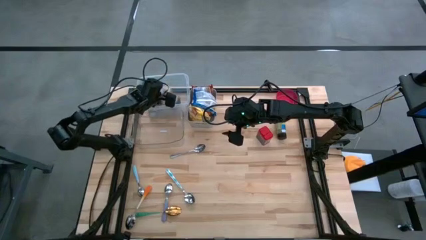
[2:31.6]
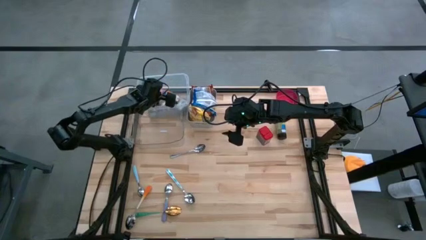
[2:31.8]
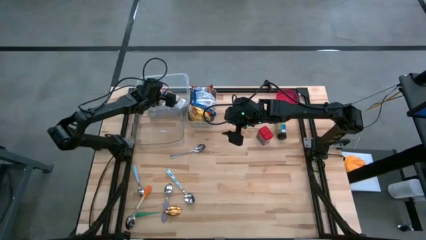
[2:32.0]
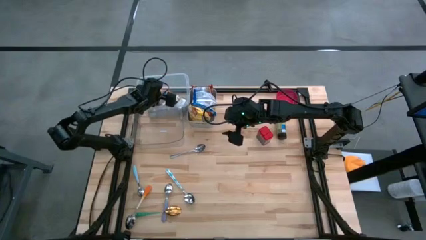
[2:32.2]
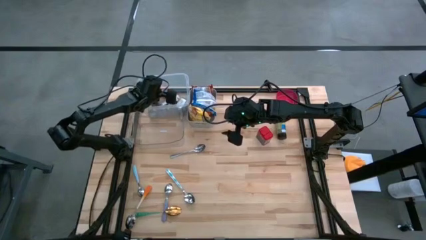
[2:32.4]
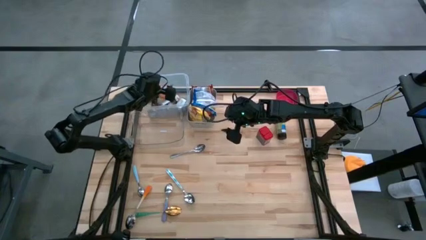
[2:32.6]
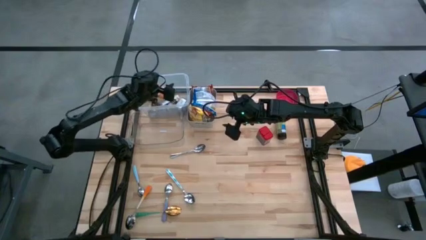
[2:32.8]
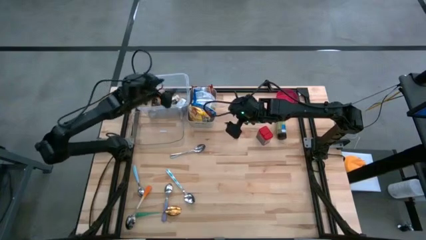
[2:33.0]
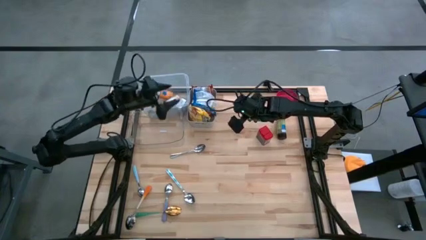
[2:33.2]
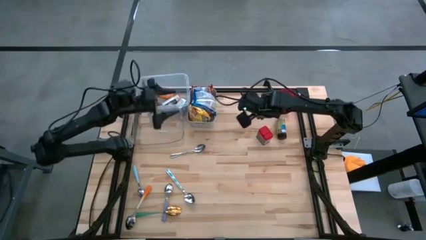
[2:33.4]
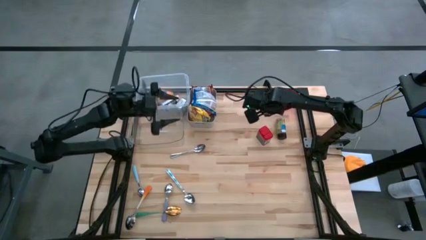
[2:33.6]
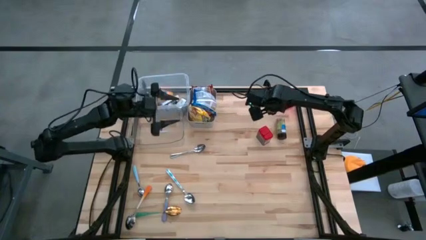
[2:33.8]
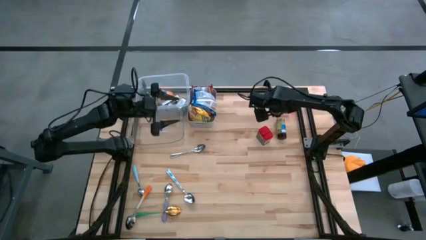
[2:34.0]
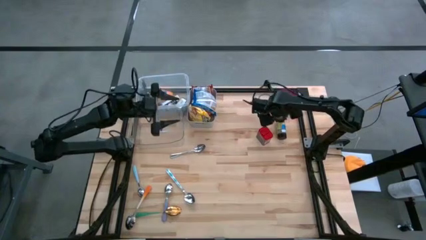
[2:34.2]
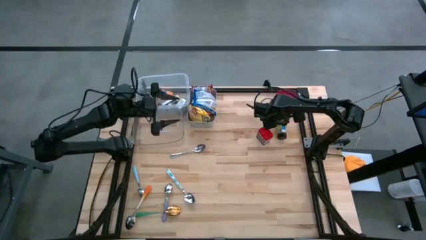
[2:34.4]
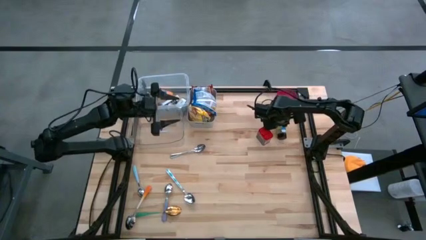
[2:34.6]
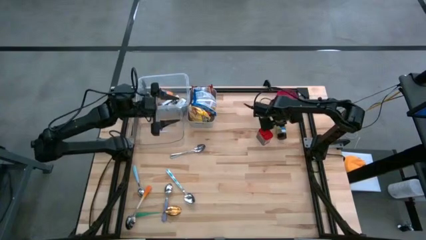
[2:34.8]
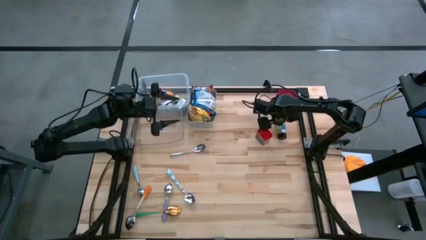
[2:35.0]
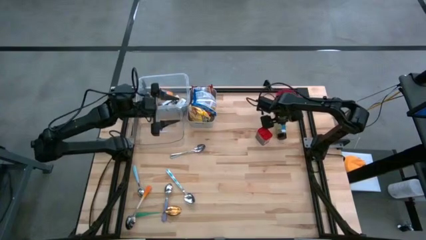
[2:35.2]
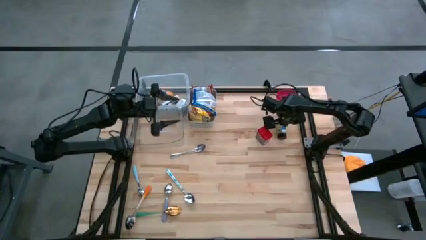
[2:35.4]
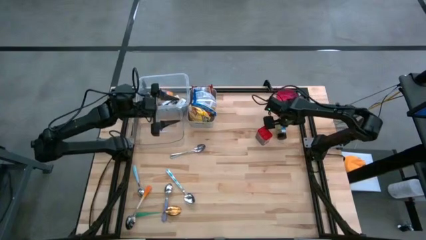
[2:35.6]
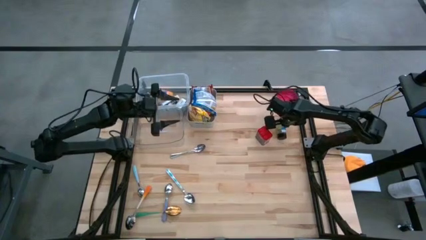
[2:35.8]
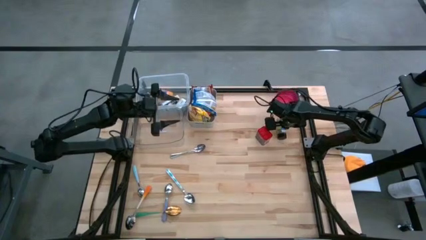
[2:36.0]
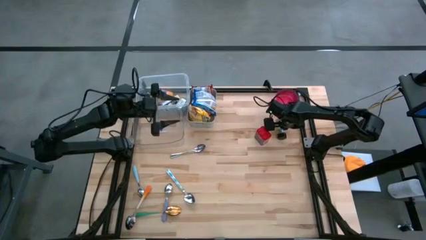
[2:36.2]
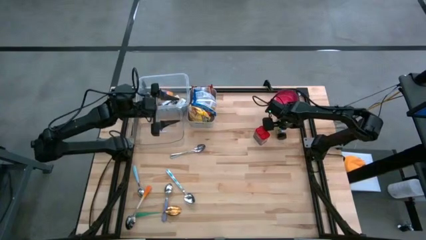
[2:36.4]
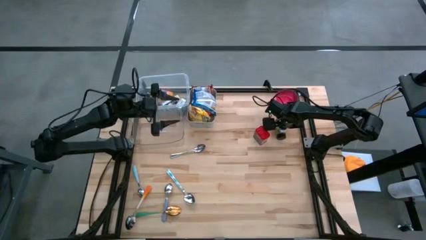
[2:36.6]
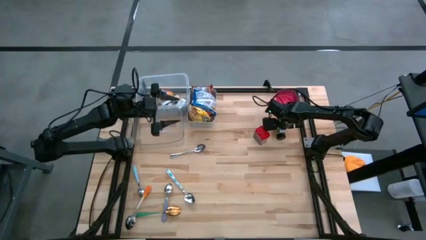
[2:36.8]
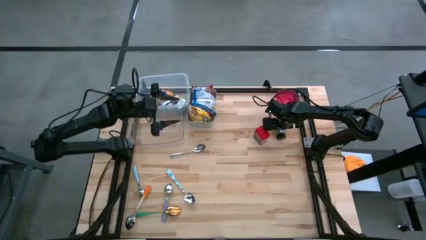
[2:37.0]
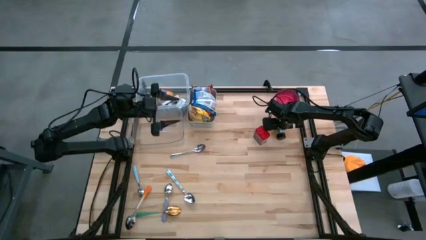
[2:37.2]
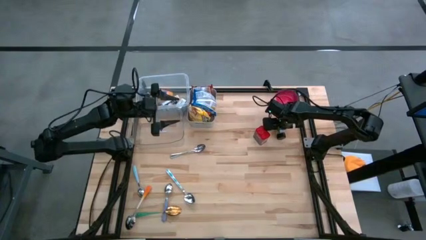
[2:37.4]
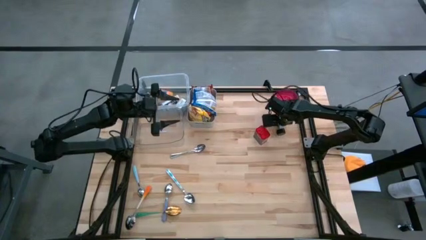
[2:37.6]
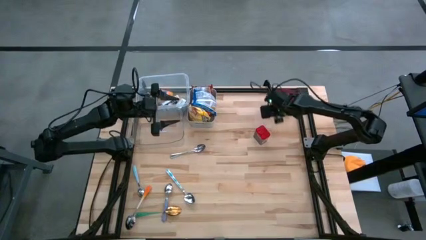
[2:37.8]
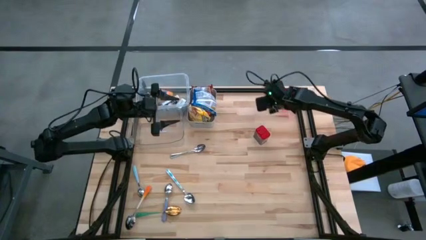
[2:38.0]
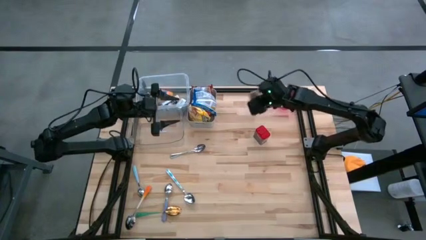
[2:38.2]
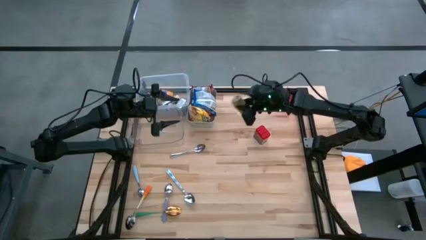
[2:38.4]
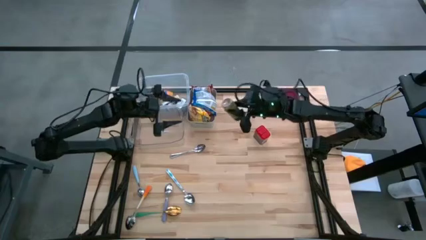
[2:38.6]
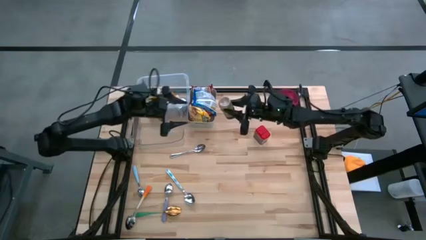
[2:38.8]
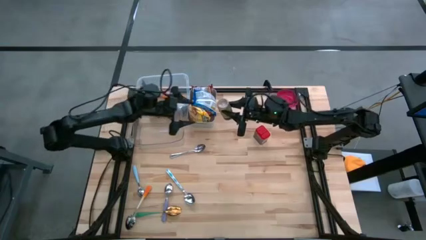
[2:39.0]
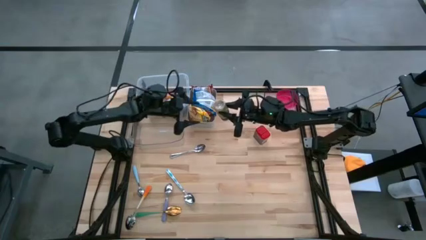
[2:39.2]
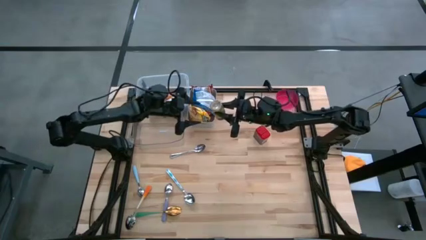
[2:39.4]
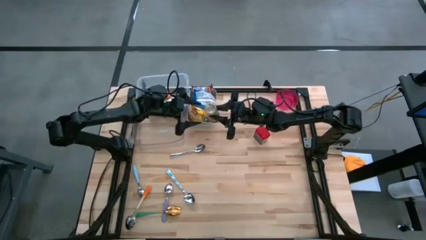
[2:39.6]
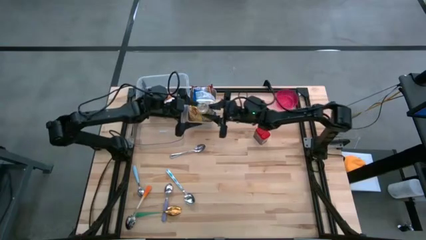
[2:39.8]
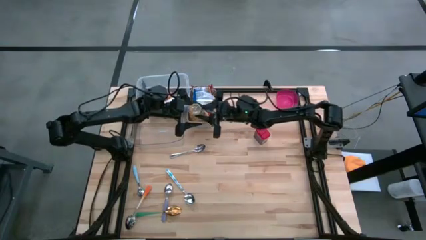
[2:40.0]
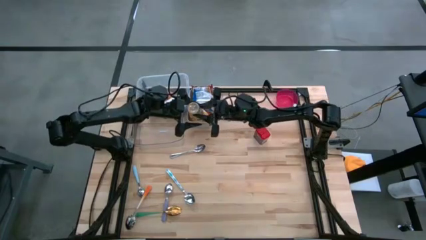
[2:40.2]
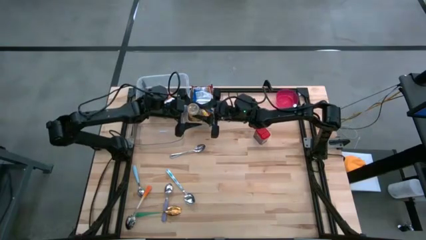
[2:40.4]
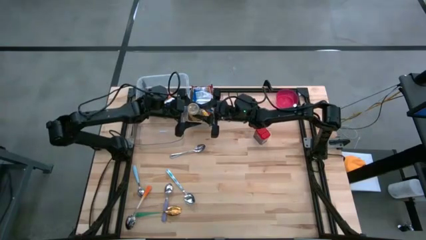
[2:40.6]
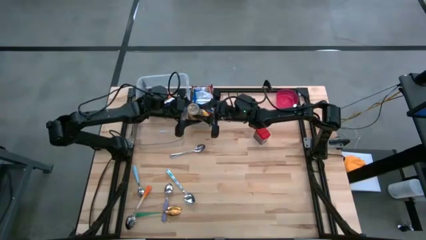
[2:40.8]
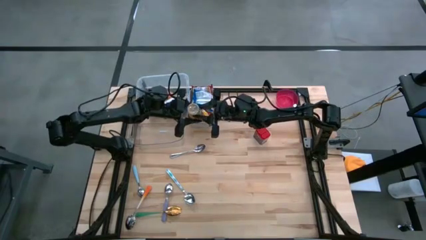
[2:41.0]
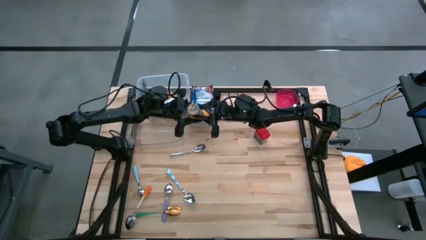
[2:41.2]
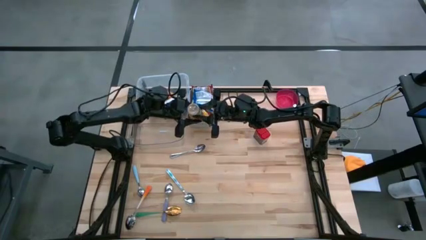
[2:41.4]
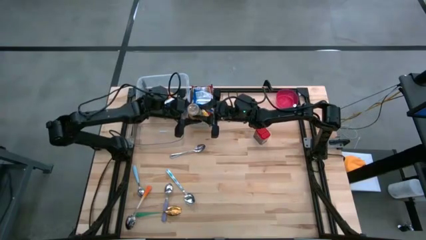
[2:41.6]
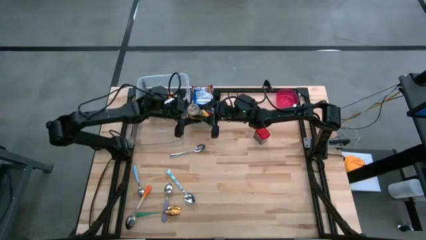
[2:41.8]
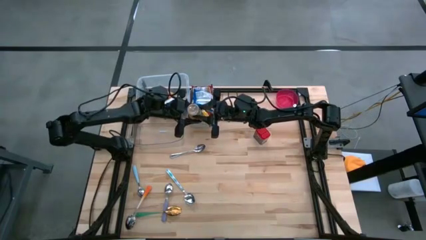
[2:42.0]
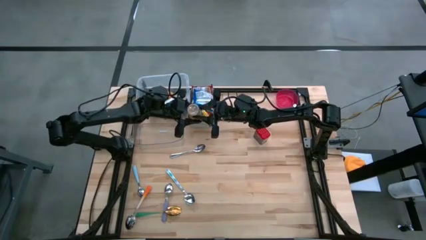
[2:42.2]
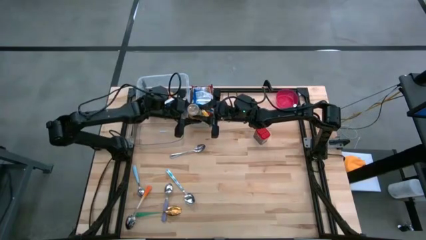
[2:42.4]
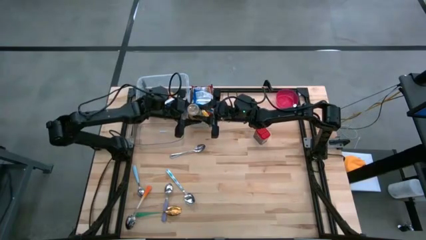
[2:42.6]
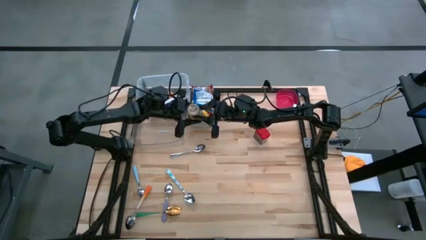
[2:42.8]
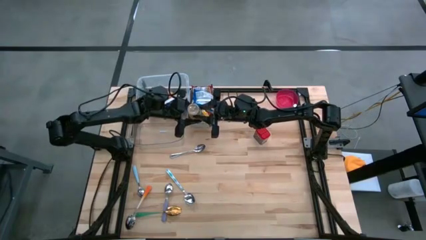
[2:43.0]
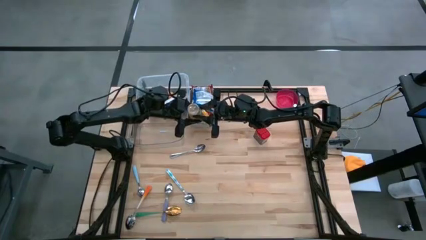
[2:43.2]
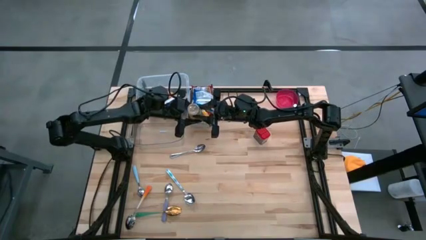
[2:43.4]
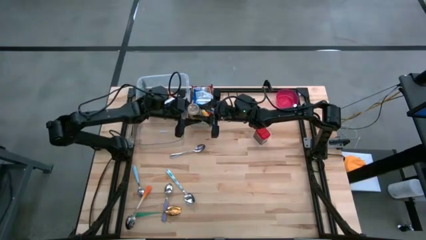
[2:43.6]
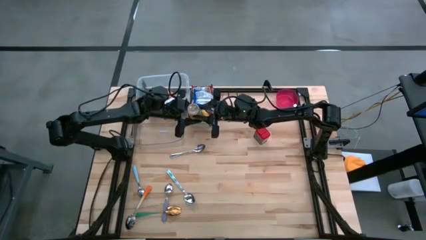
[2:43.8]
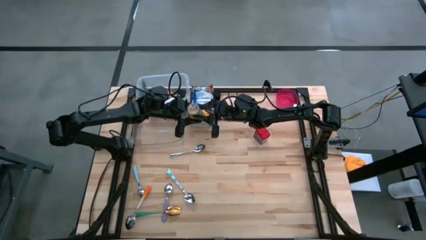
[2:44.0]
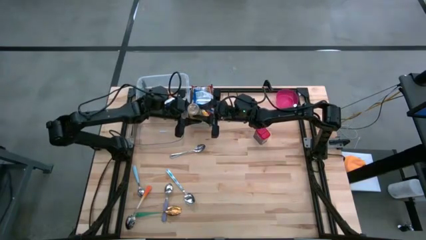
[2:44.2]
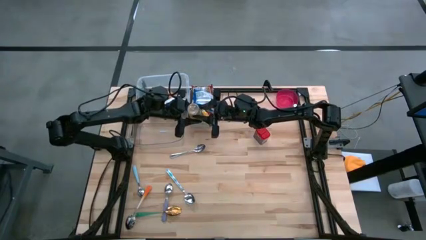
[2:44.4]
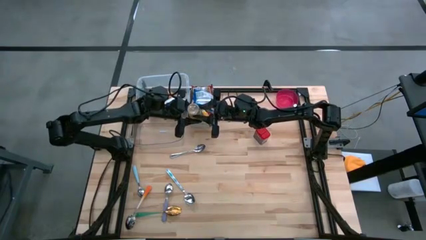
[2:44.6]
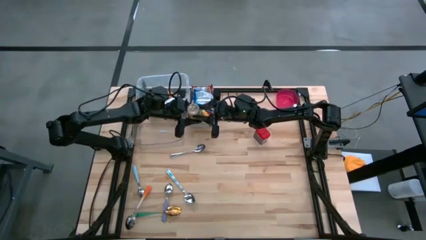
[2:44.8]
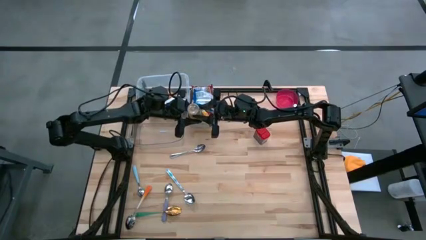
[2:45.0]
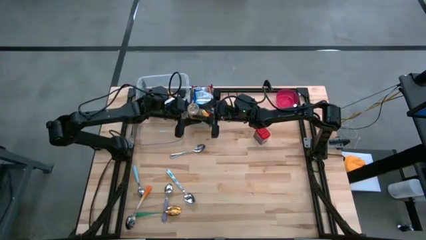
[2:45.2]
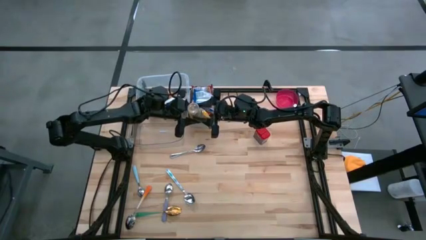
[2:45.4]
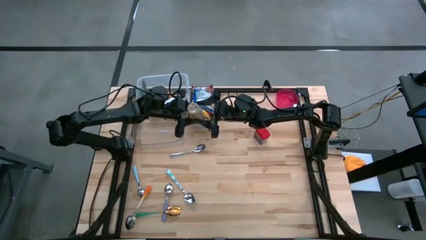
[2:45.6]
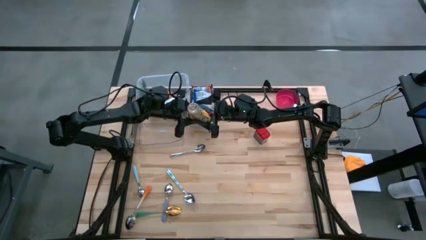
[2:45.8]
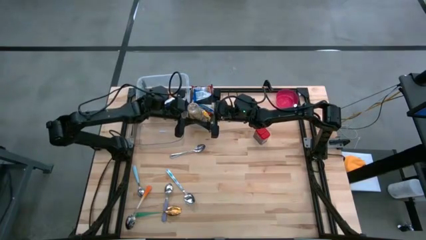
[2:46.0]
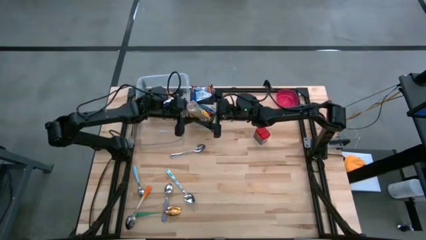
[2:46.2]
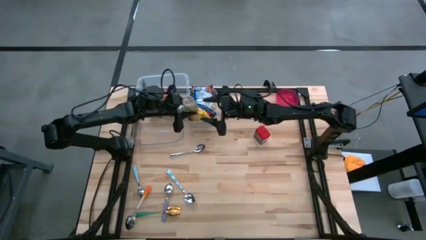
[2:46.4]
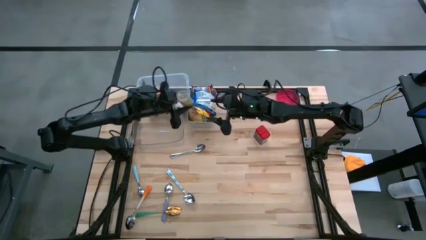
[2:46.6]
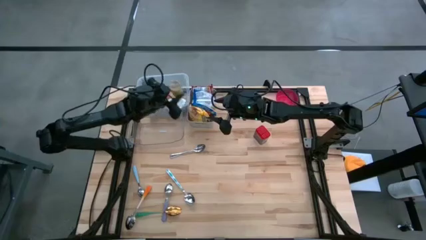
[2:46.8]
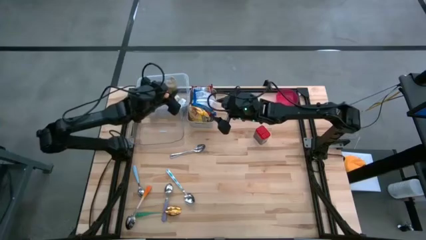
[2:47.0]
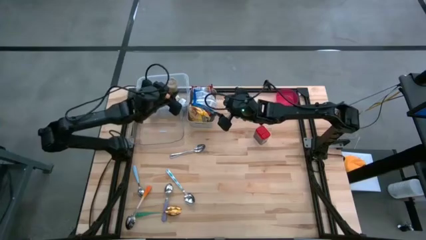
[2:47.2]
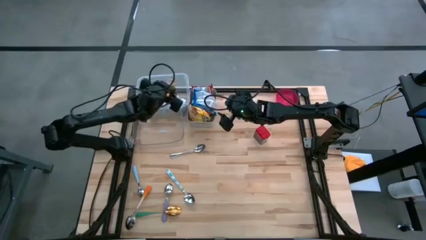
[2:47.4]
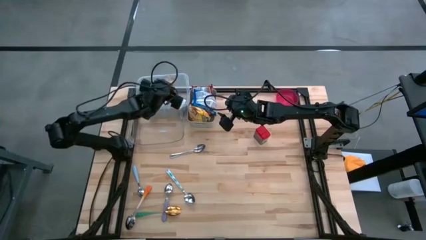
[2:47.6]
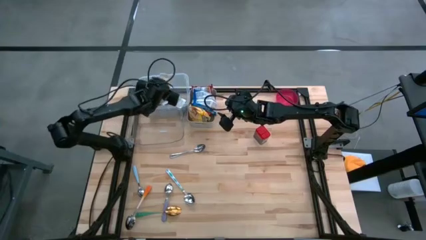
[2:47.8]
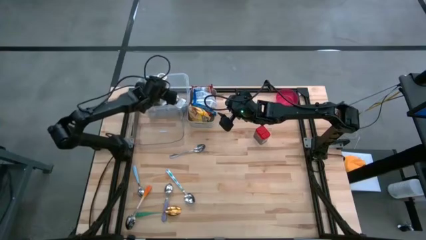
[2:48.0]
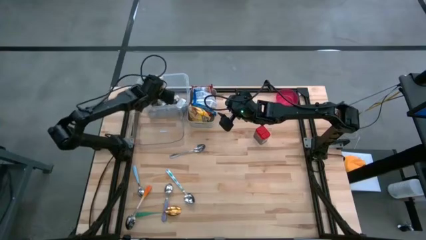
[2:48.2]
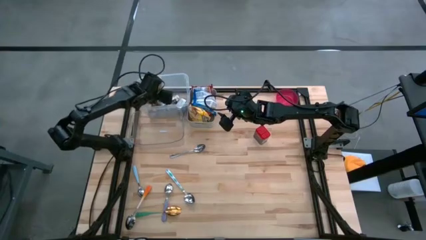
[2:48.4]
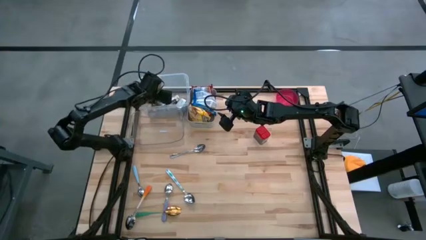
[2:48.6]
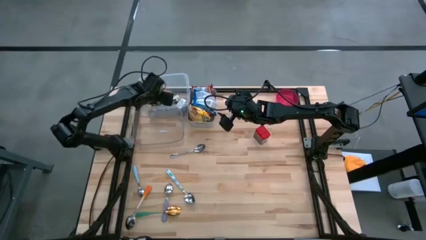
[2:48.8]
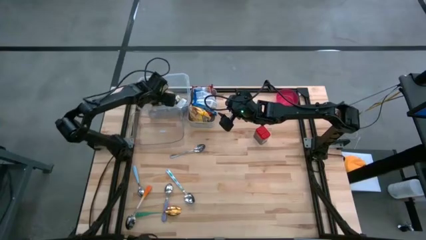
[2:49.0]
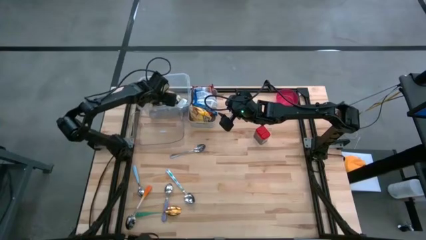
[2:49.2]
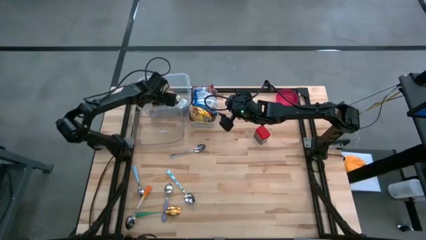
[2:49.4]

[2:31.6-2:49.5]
Put the green seasoning bottle into the white bin
